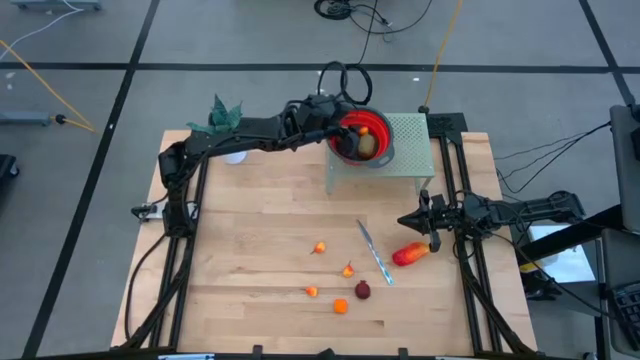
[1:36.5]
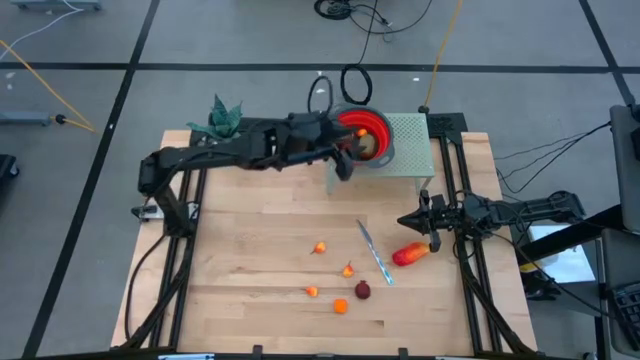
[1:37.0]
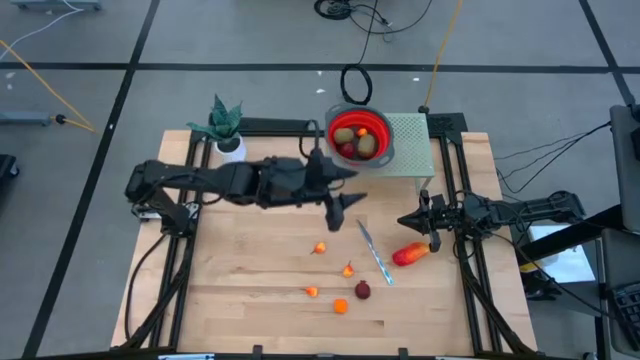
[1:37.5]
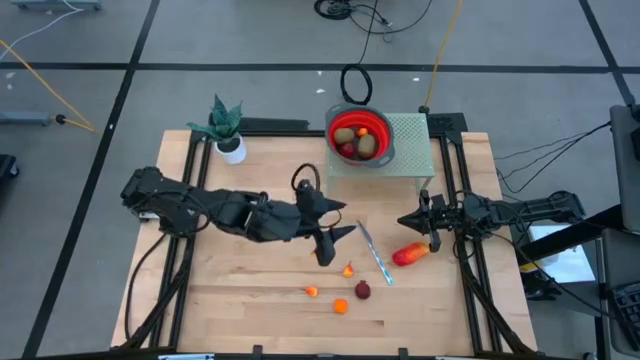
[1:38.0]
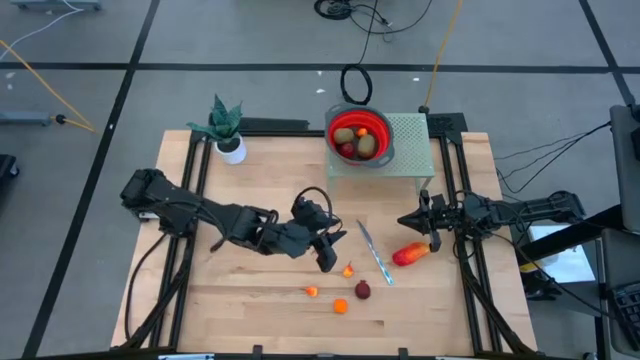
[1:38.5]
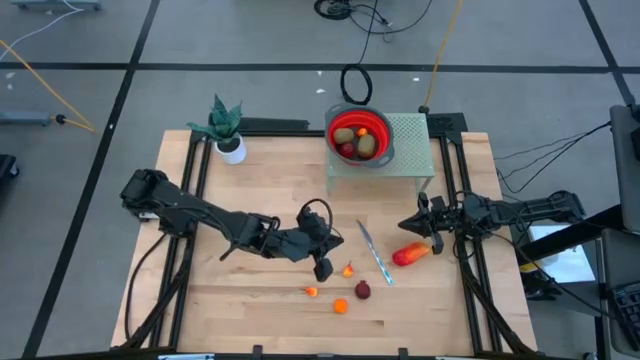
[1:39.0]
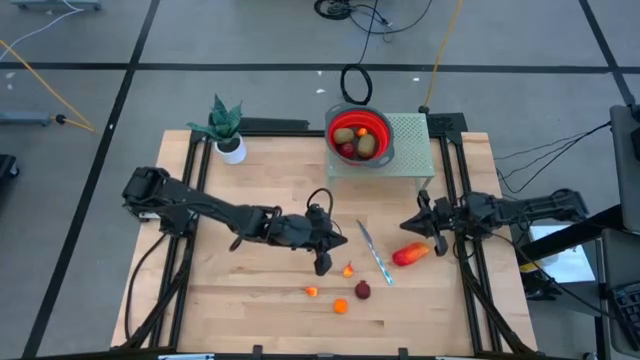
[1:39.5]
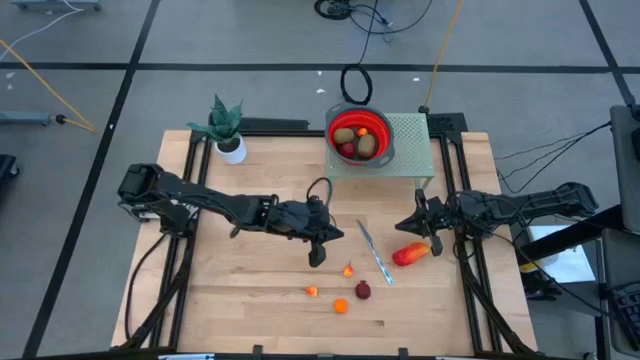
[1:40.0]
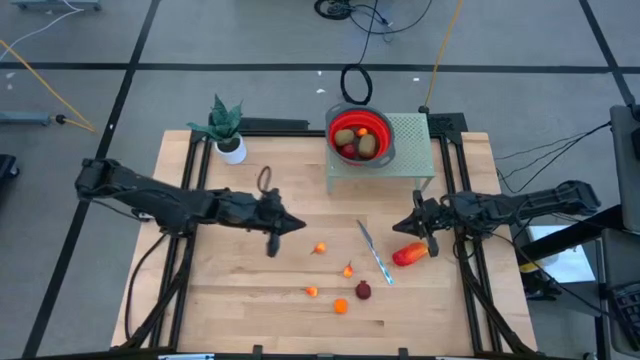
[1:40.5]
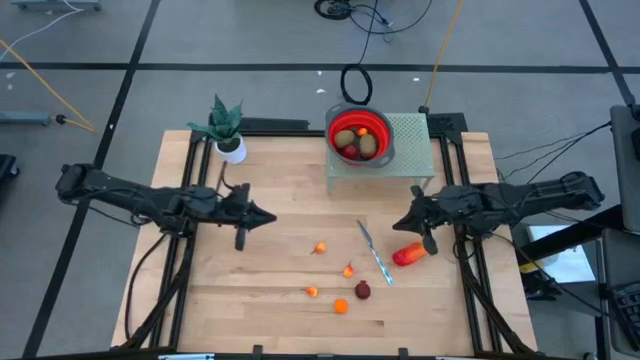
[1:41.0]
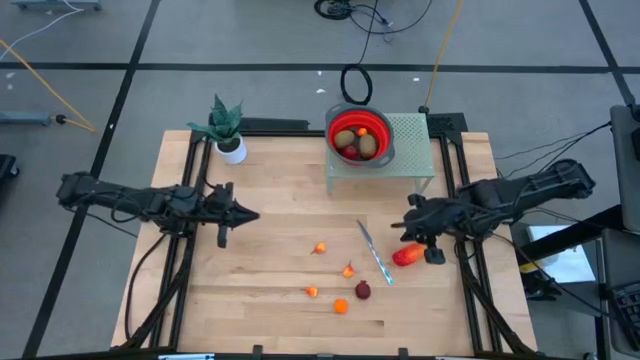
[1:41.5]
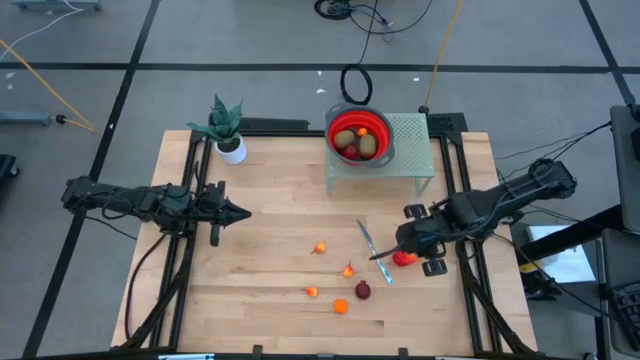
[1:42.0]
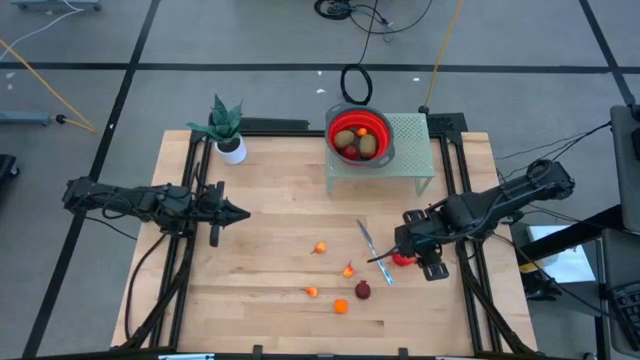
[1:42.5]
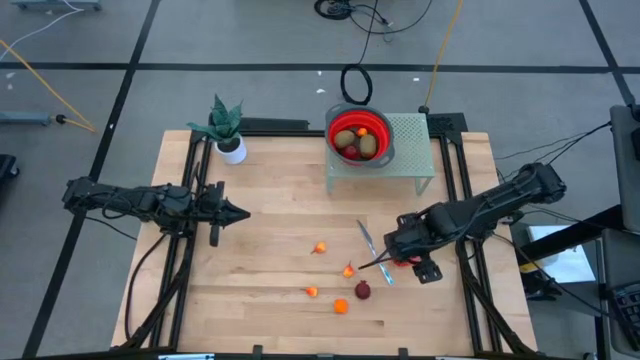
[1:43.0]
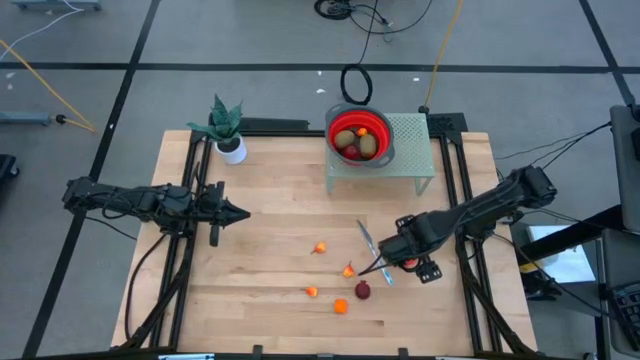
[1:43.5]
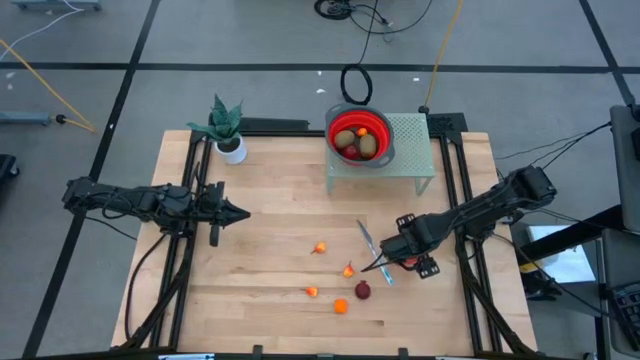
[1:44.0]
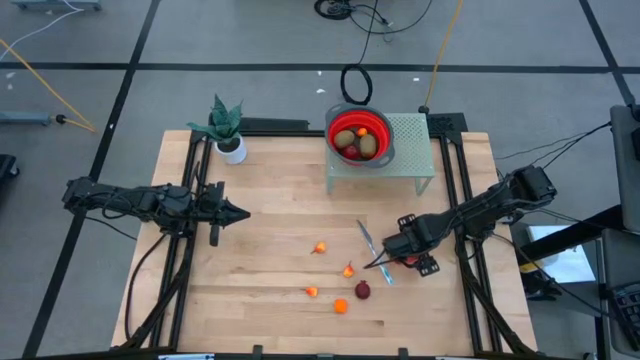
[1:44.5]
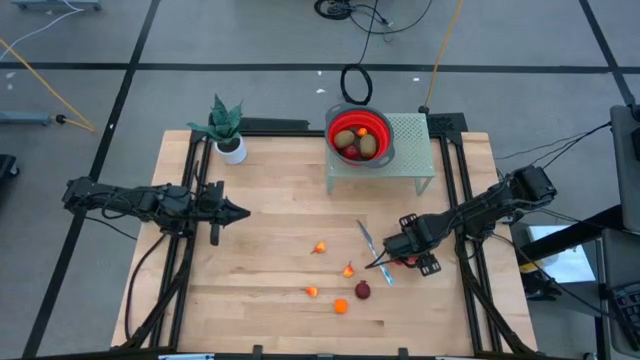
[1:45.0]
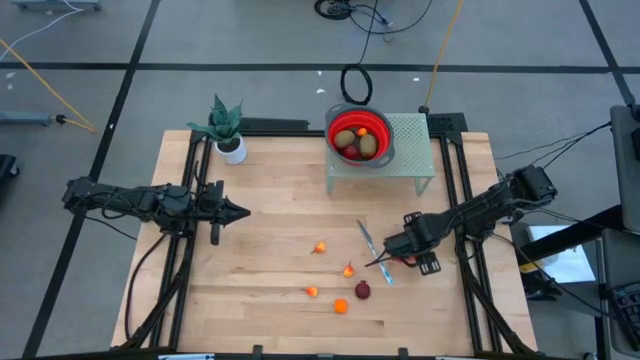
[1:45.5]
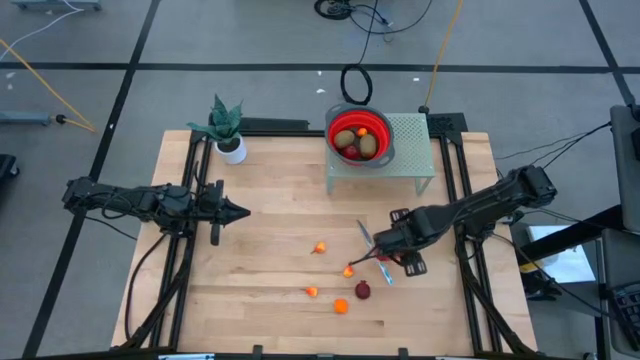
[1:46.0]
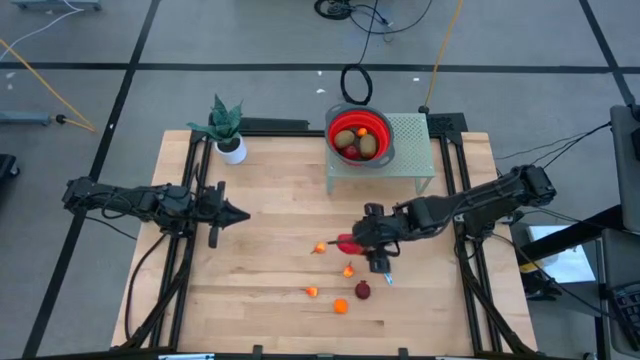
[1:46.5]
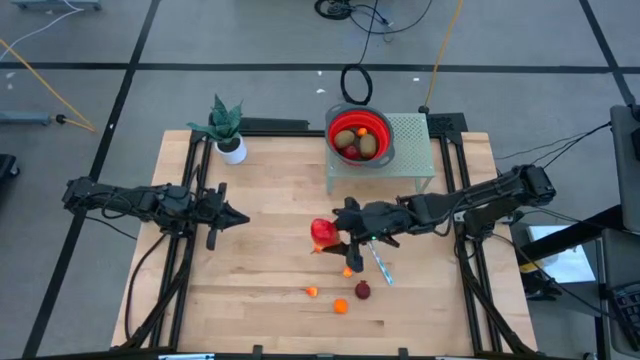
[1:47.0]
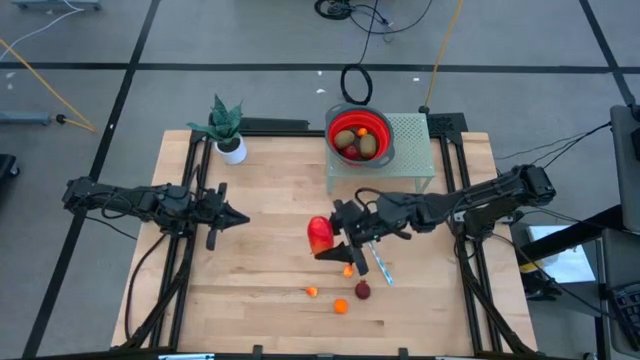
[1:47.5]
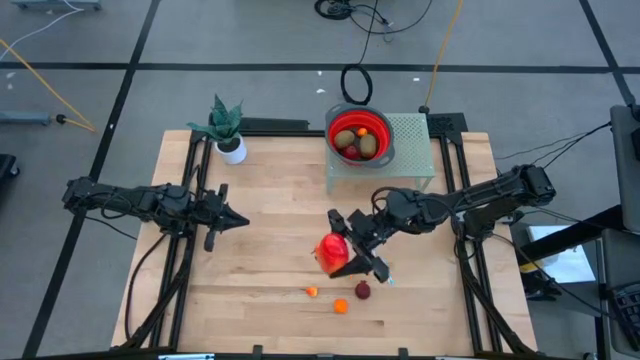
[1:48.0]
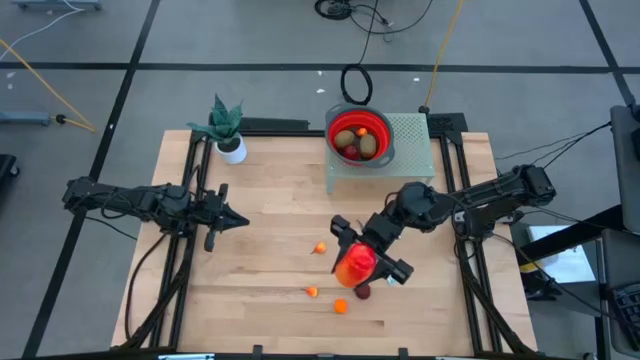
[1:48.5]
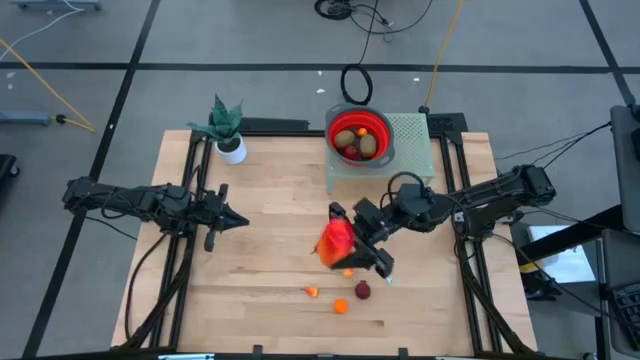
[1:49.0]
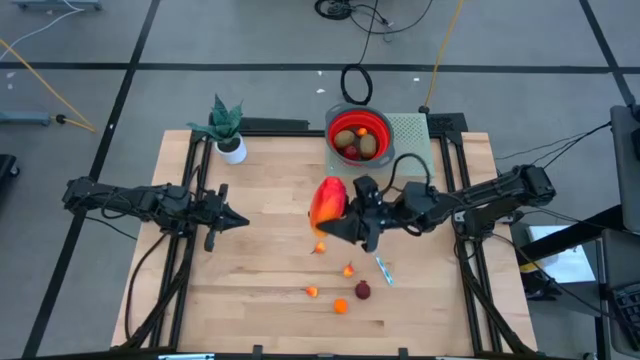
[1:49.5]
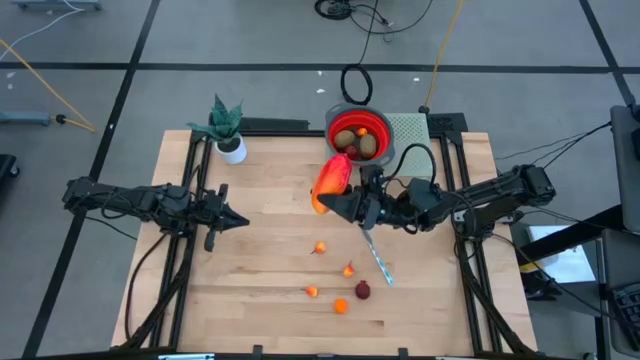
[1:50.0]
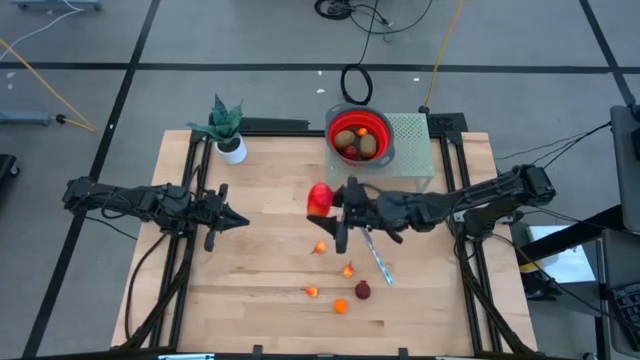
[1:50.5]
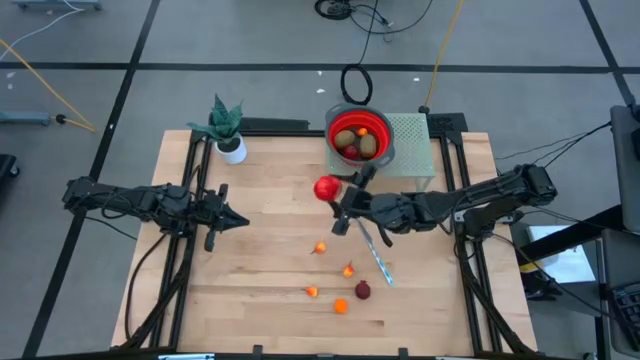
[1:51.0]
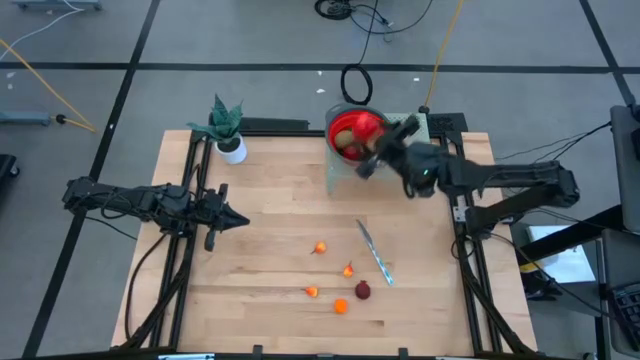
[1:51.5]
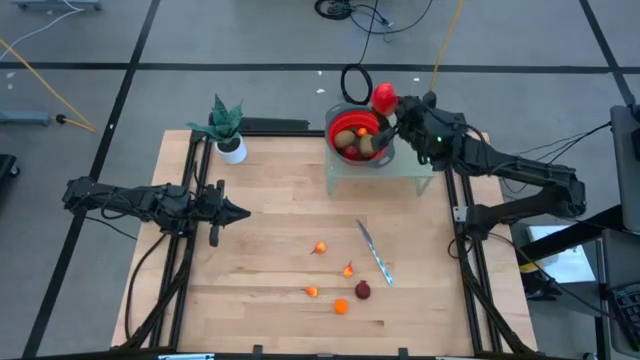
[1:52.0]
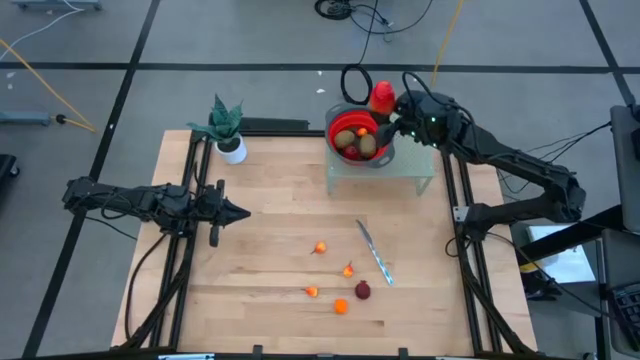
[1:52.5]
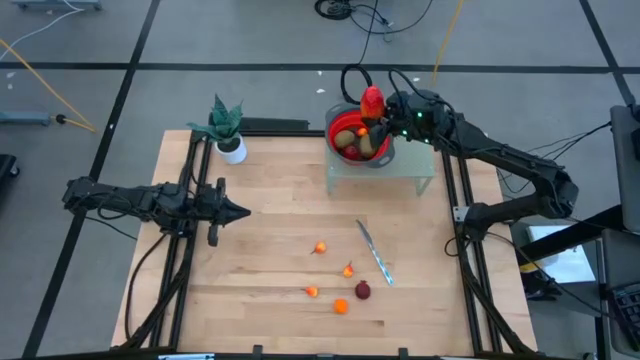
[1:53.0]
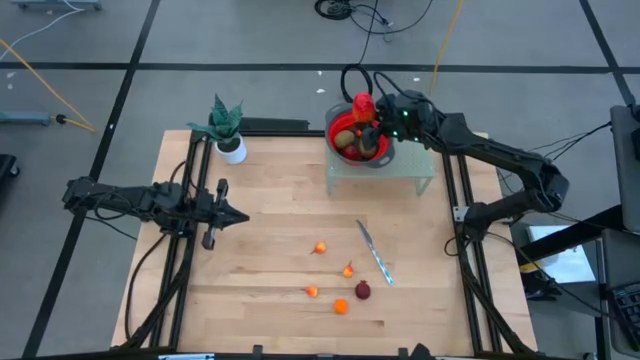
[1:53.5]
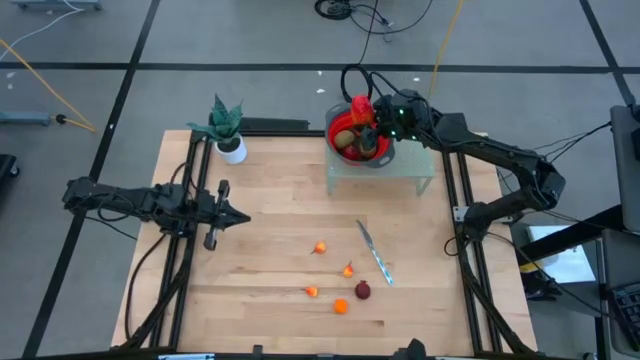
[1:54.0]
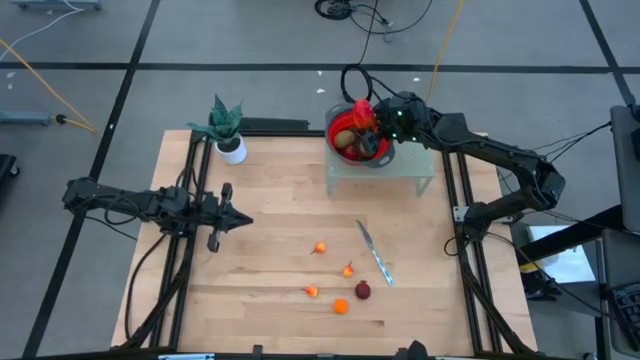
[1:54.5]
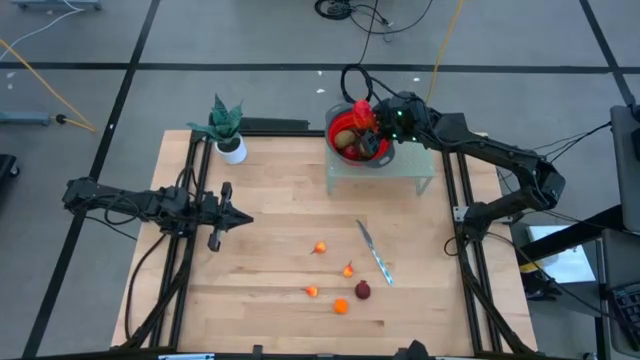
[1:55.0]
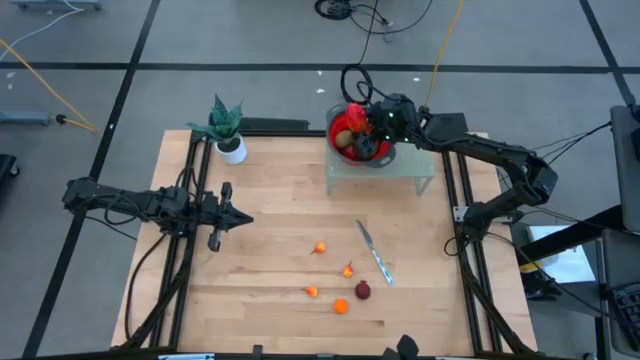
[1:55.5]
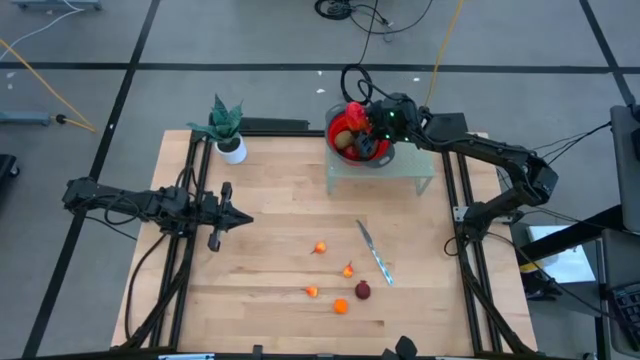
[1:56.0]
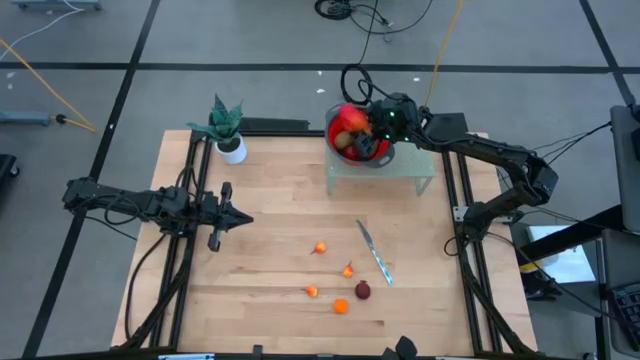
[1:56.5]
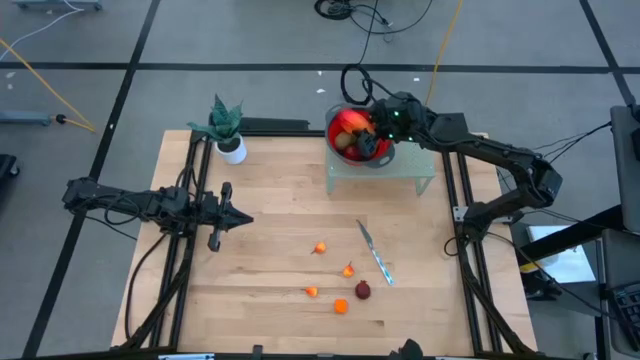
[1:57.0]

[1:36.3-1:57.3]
Task: Pick & Place Fruit
Put the orange mango into the red basket on the shelf

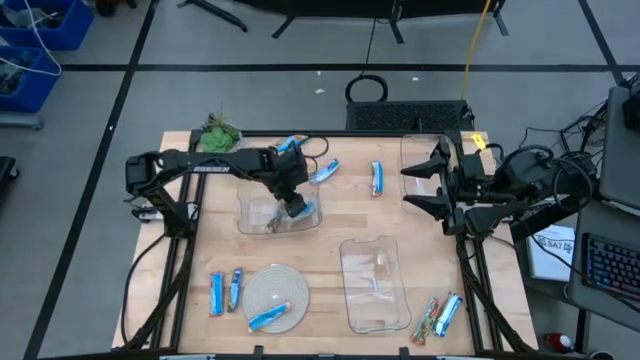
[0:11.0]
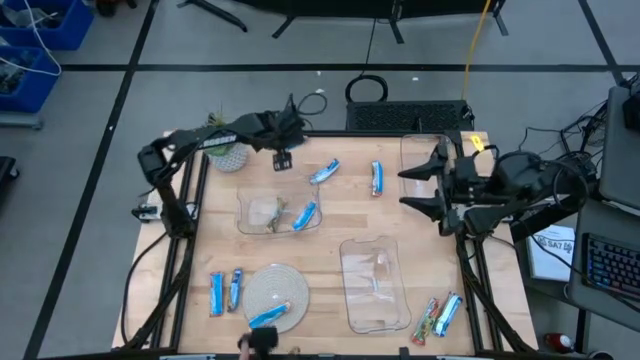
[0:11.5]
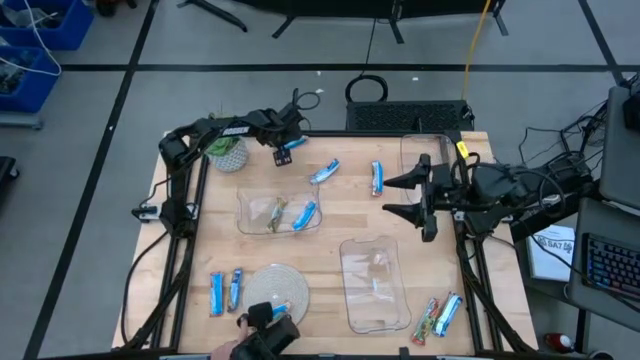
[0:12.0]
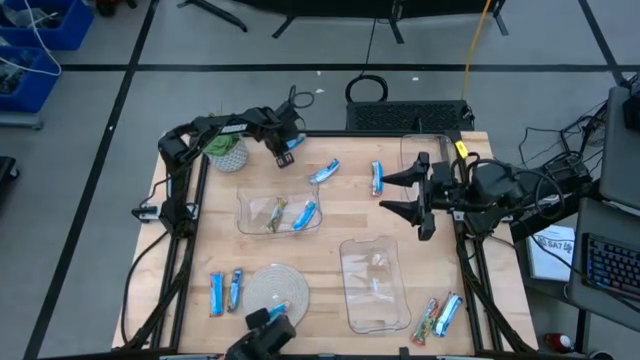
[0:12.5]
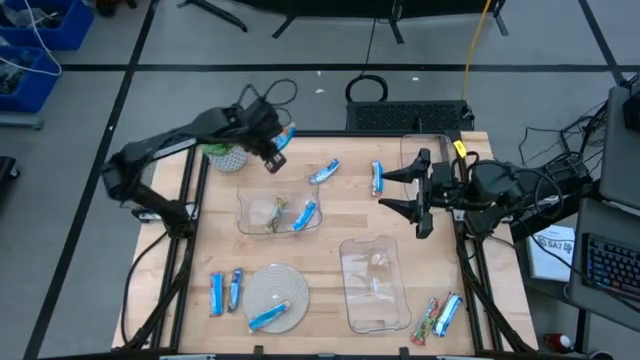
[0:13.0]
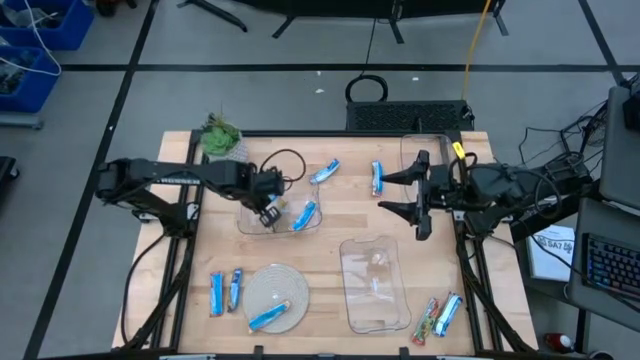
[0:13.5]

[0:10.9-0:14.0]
Task: Pick and place Granola Bars by type
Put the top yellow granola bar into the top left transparent bin
